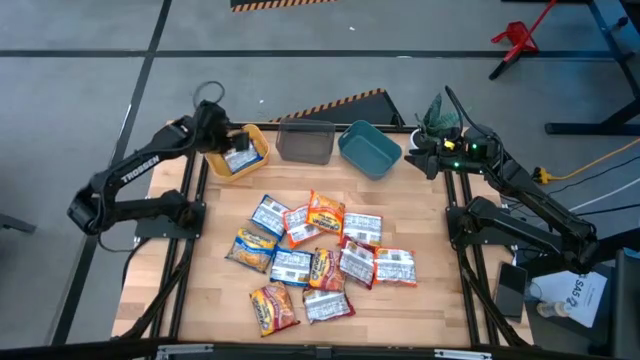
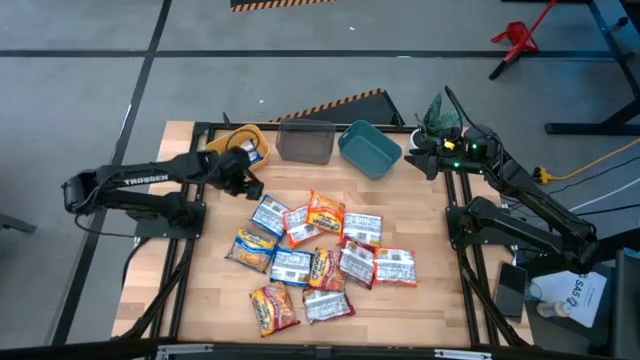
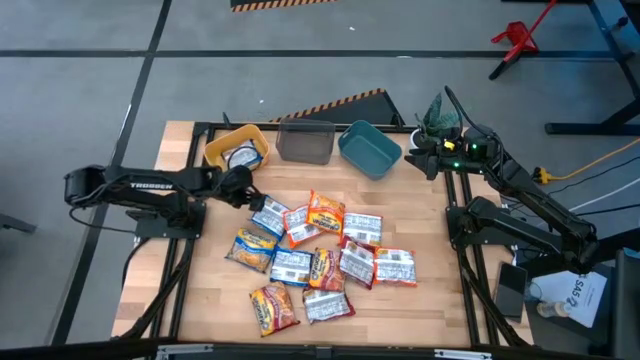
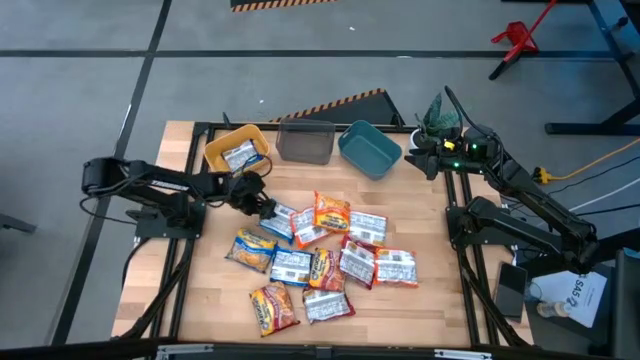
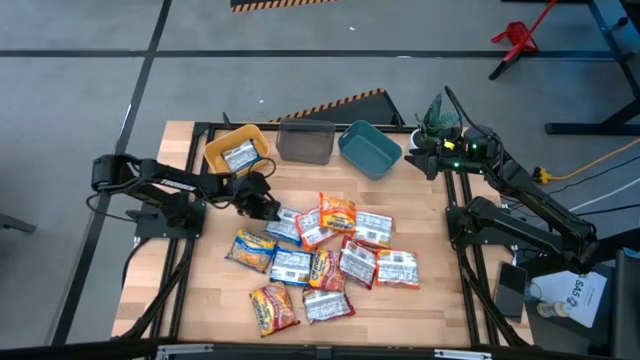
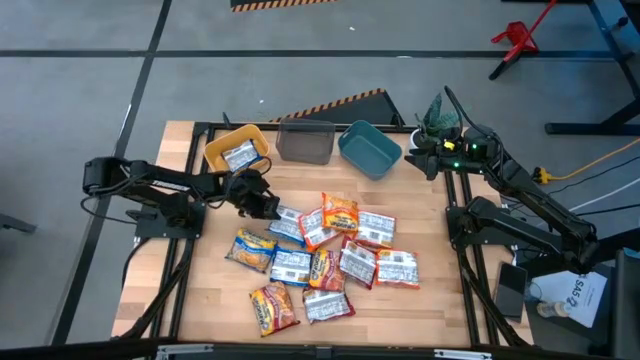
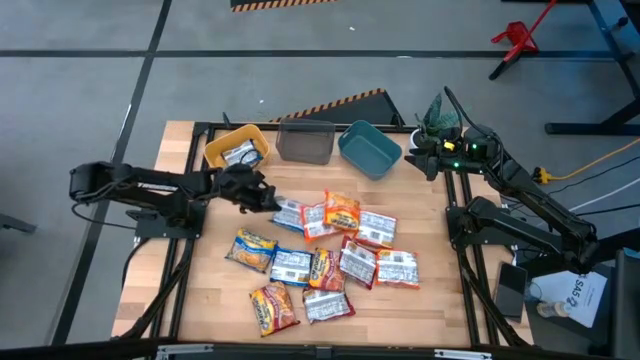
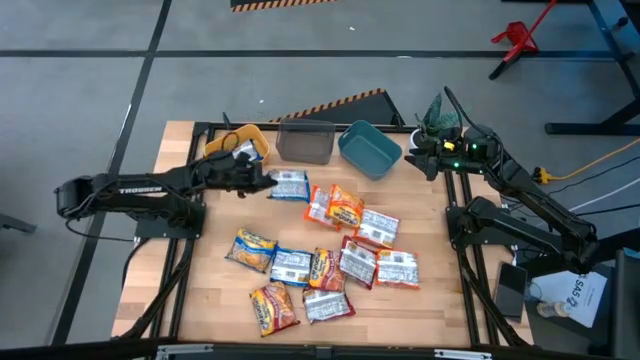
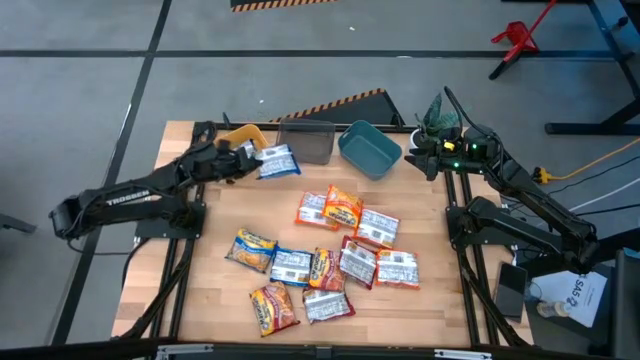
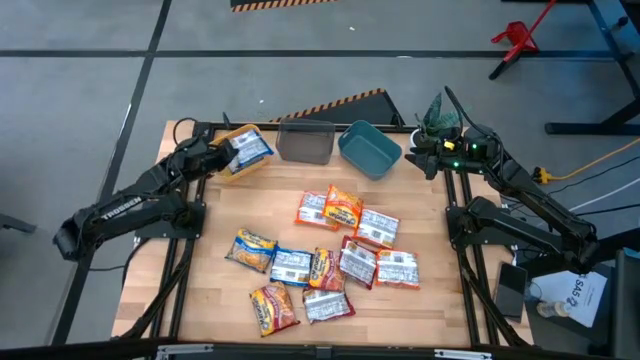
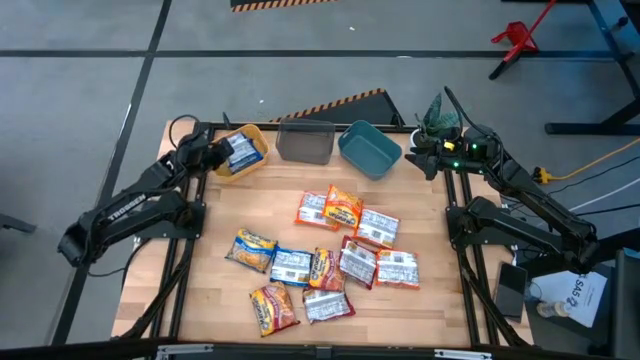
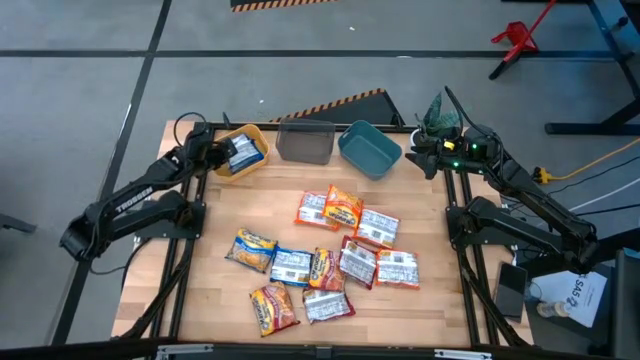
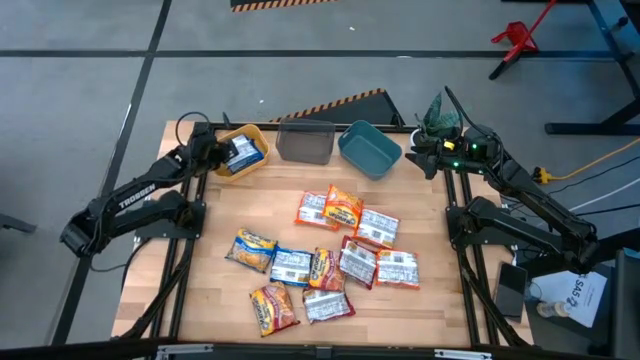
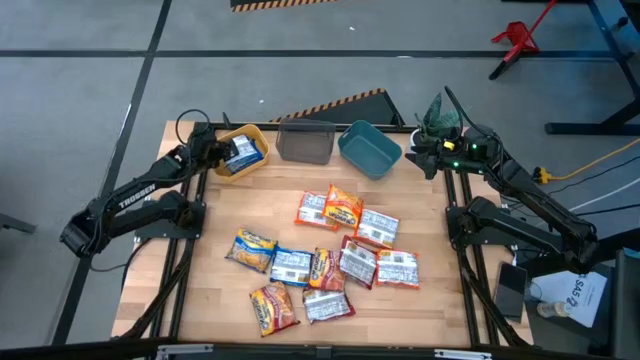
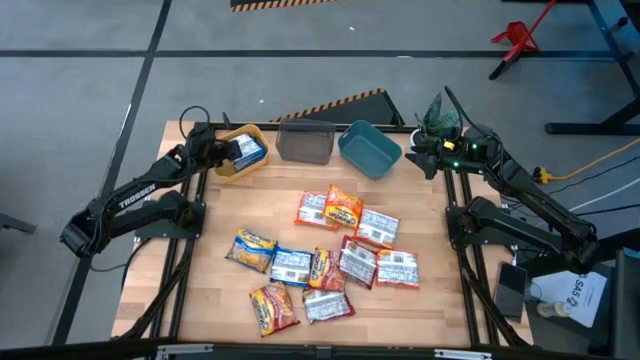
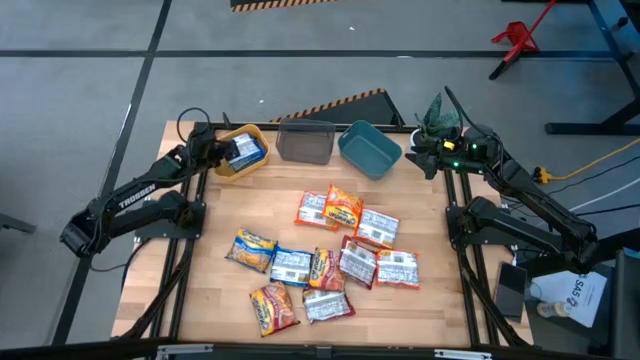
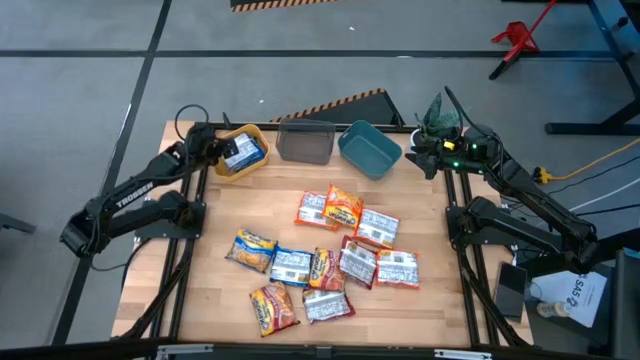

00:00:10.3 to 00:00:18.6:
Task: Sort Maruchan noodles
Put the blue noodle pack into the yellow bin

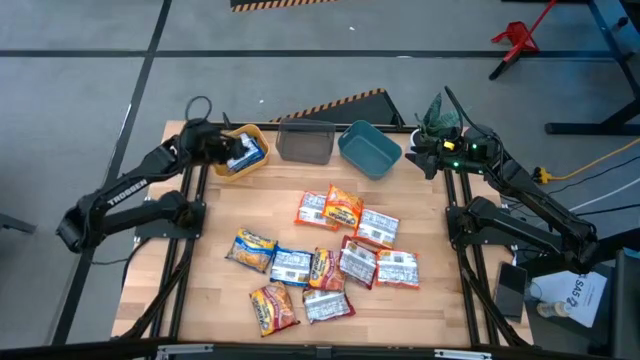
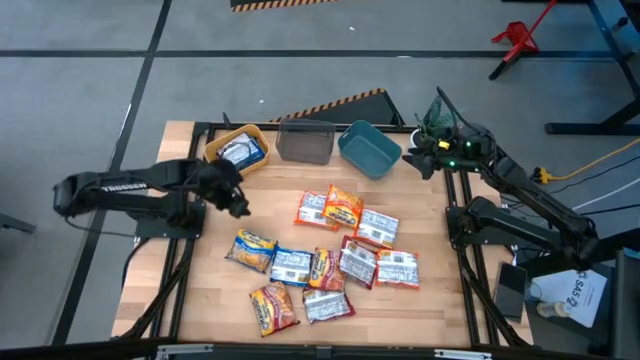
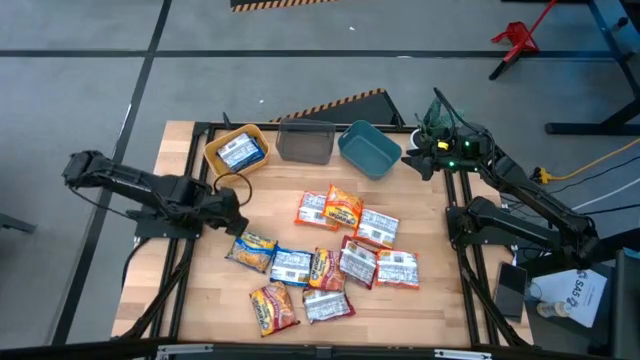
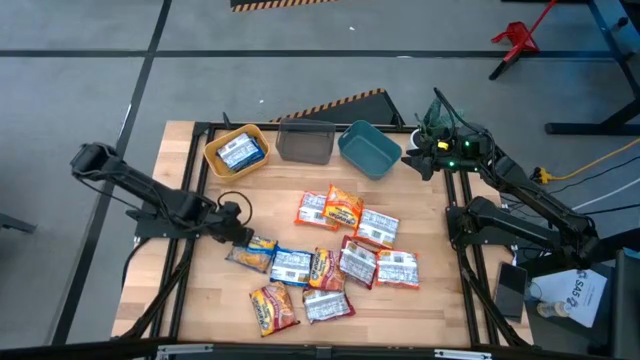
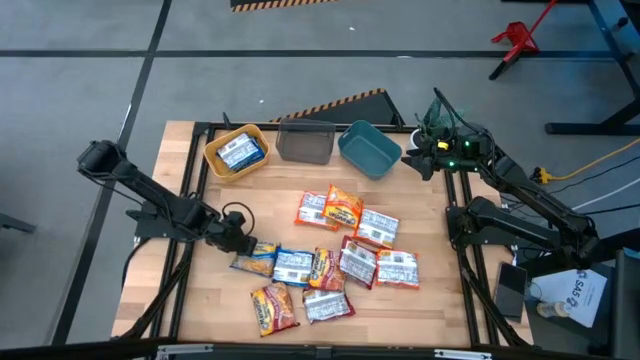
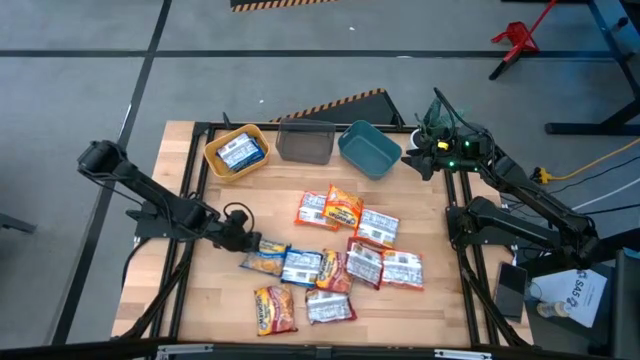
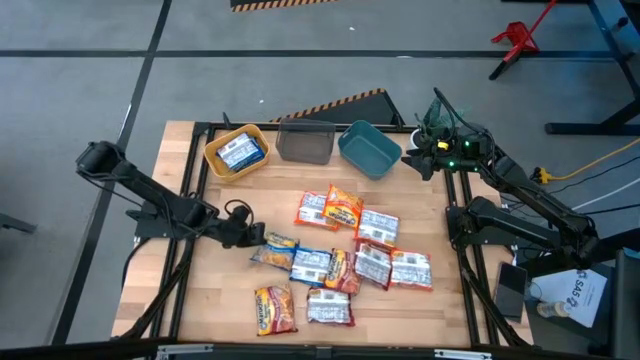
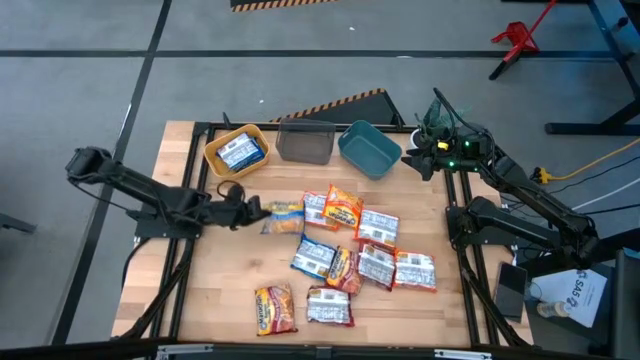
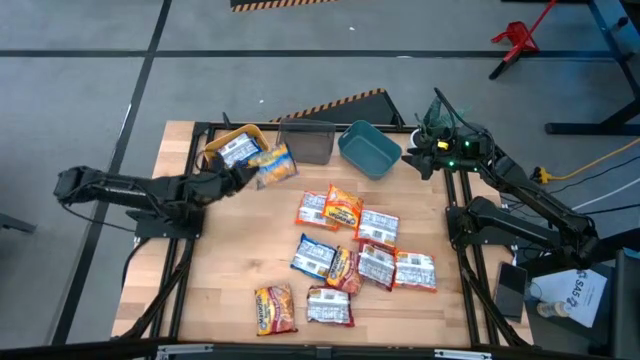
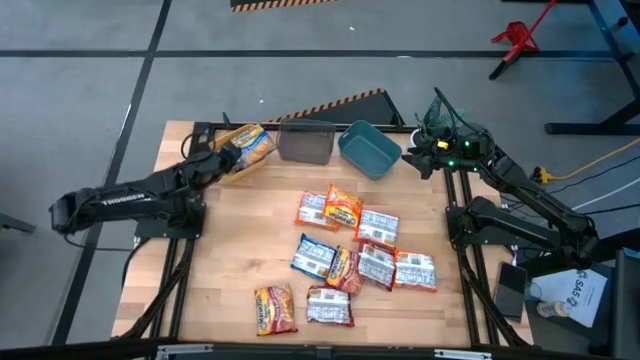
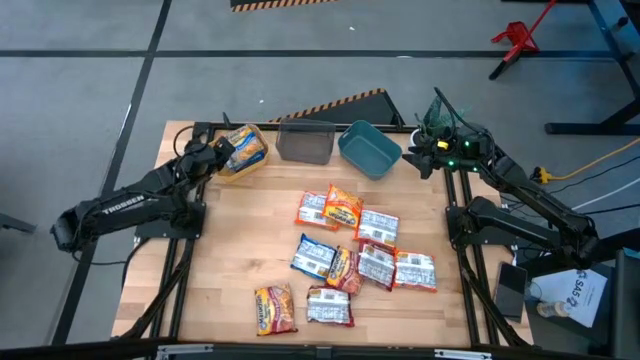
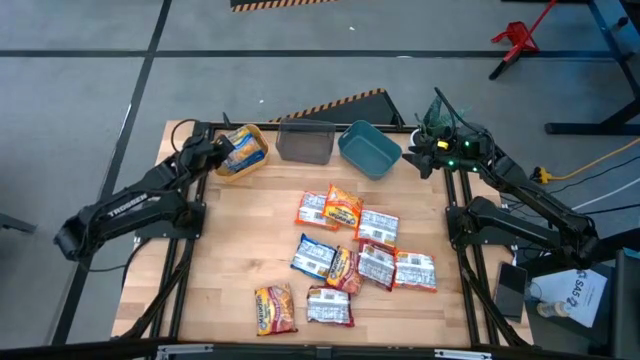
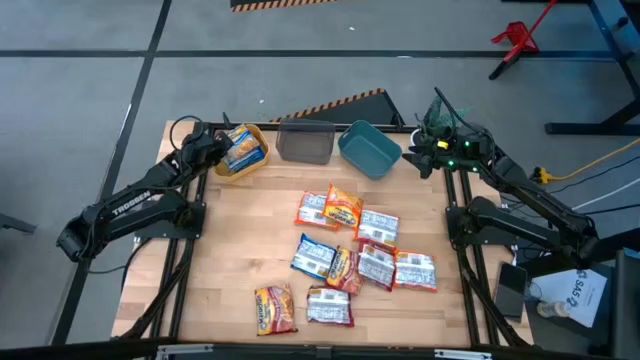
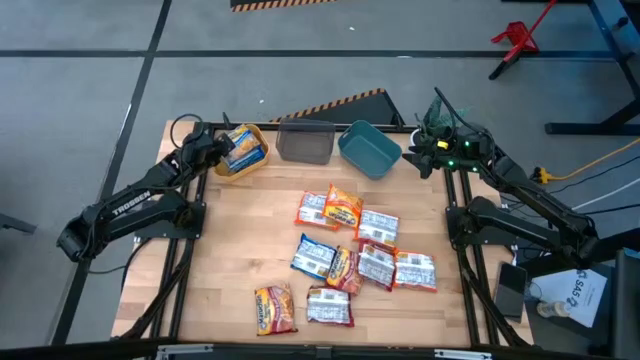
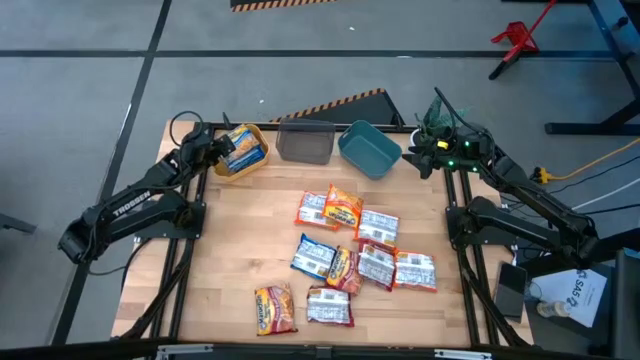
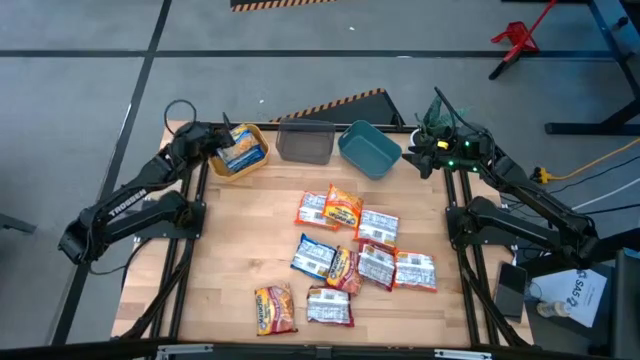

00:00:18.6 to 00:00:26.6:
Put the blue noodle pack into the yellow bin

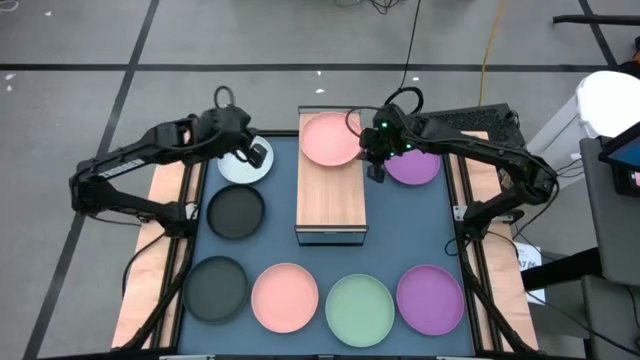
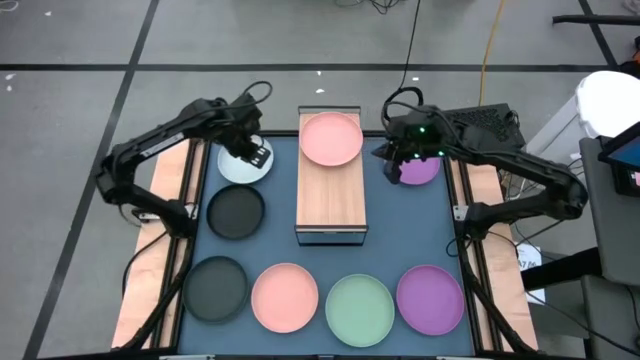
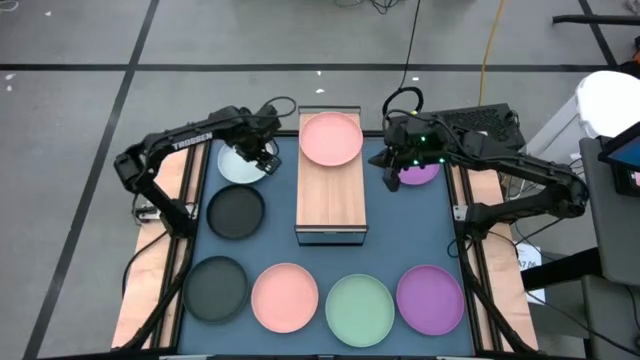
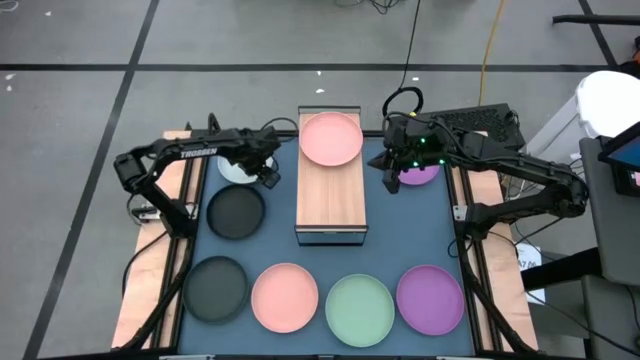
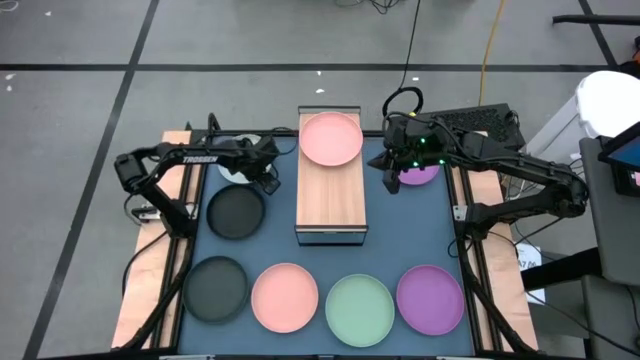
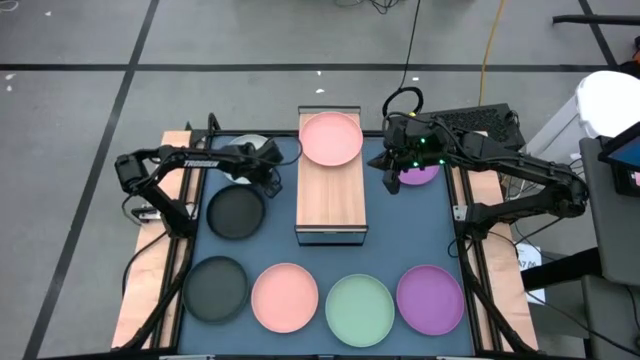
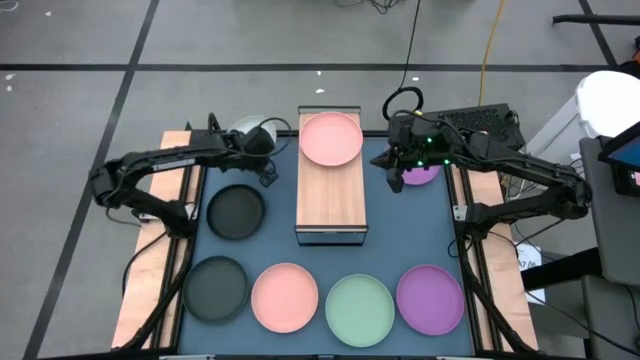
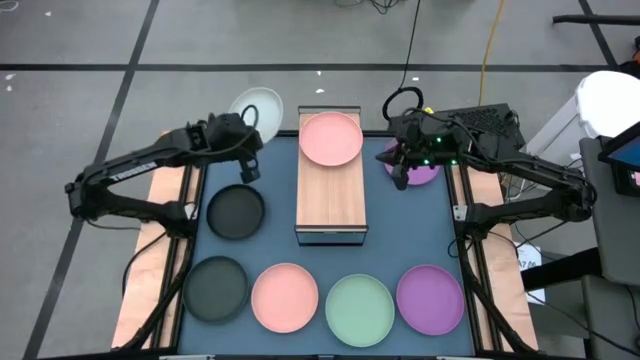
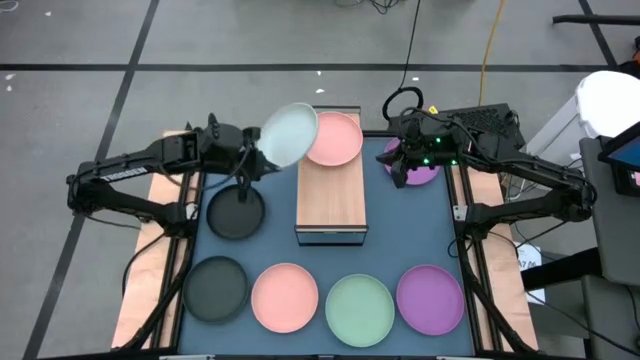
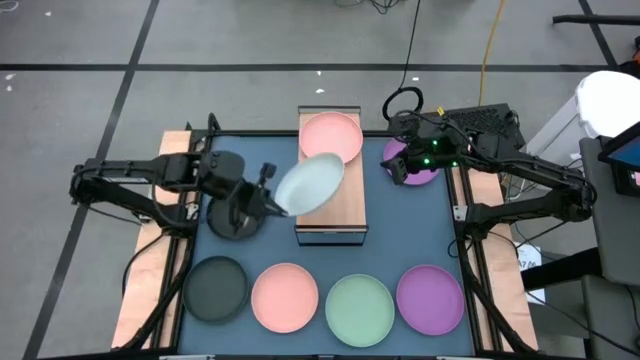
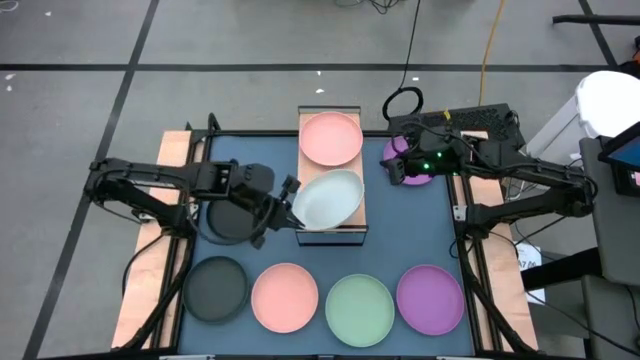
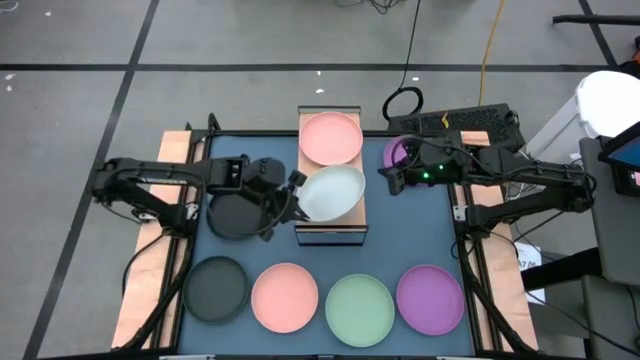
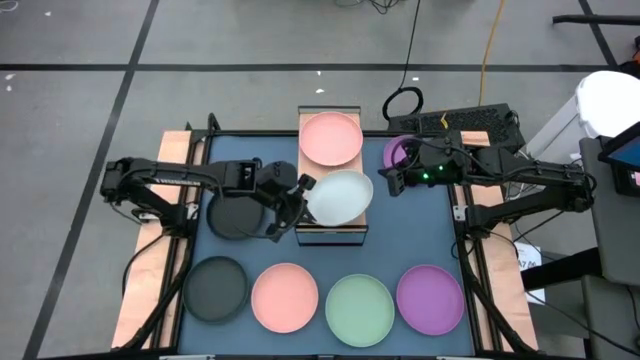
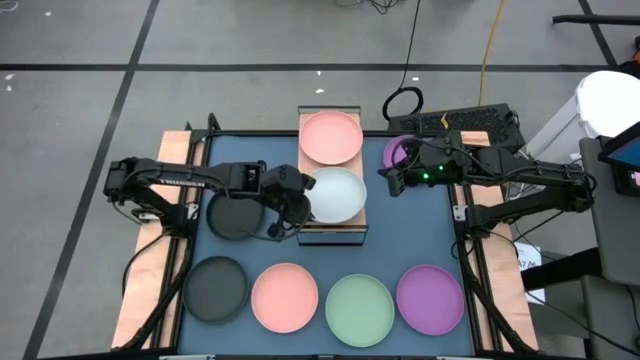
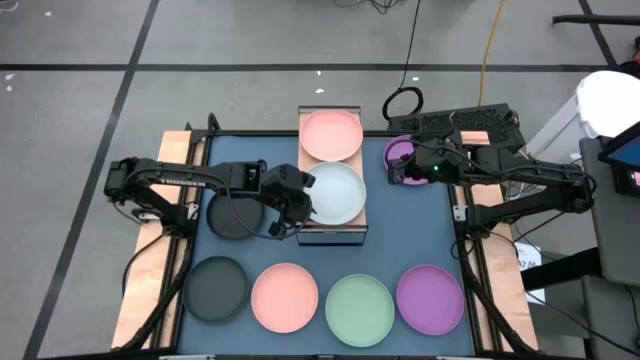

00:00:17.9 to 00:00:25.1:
Task: Place and stack plates onto a shelf
Put the blue plate on the shelf
